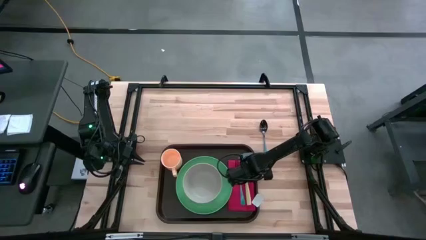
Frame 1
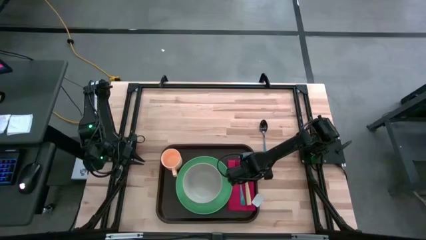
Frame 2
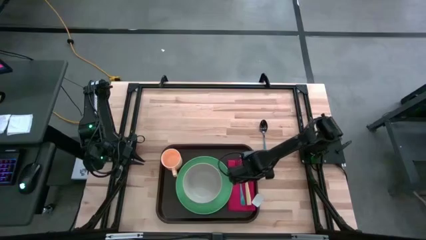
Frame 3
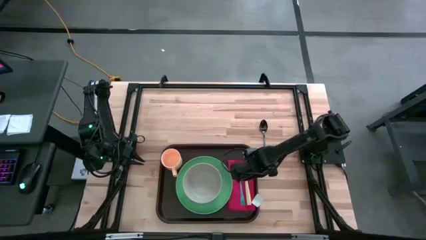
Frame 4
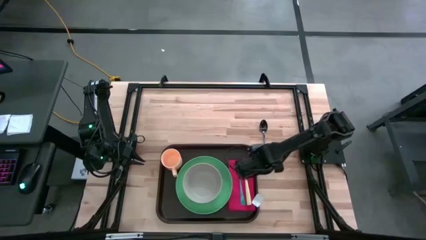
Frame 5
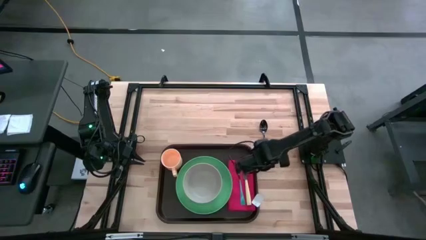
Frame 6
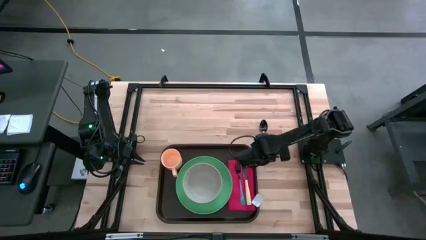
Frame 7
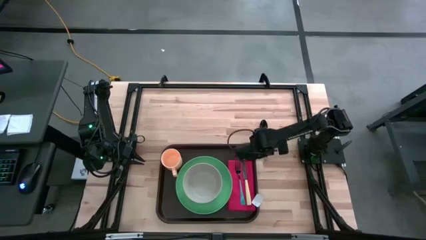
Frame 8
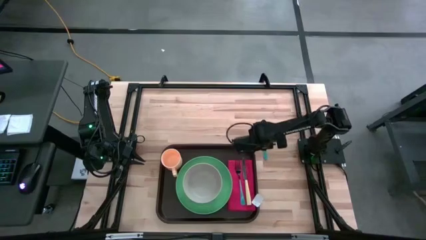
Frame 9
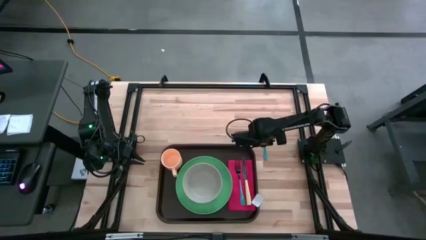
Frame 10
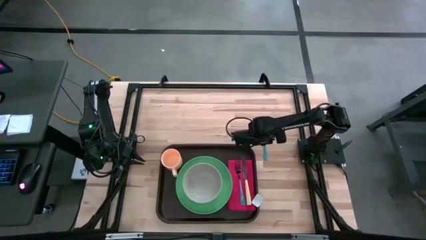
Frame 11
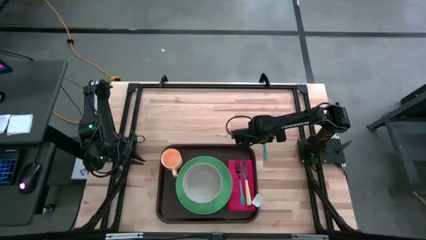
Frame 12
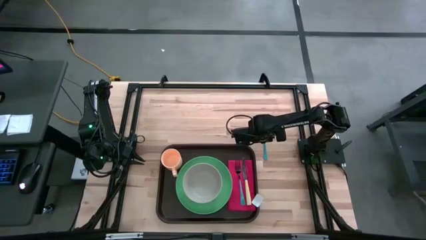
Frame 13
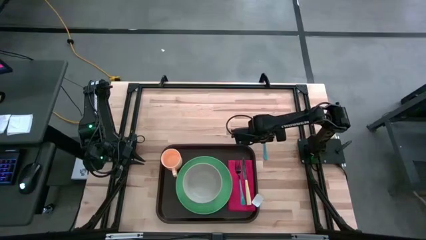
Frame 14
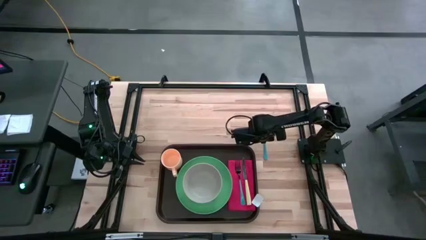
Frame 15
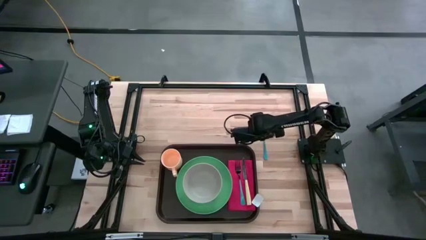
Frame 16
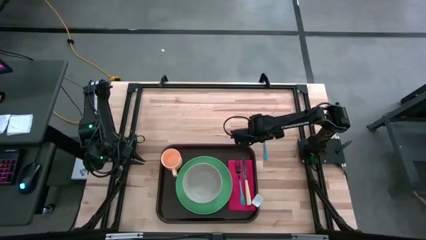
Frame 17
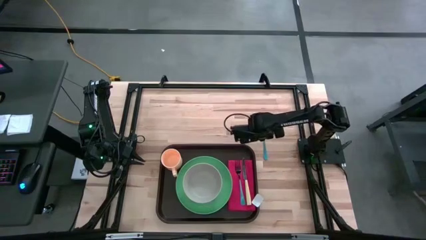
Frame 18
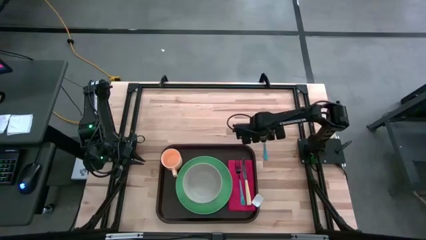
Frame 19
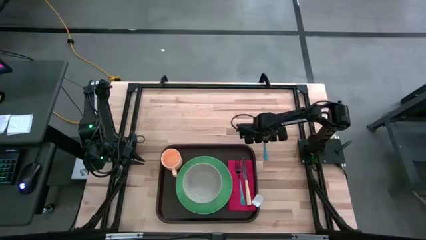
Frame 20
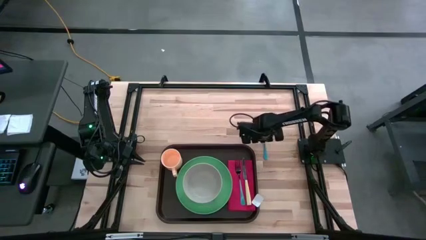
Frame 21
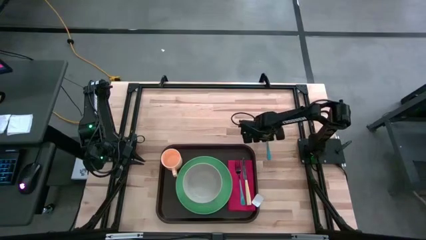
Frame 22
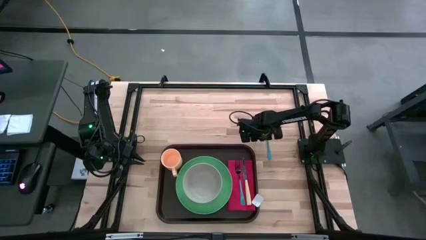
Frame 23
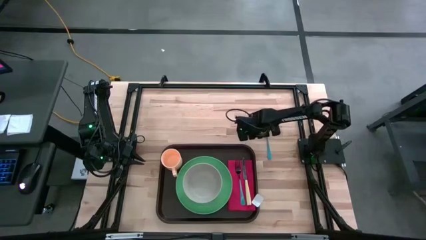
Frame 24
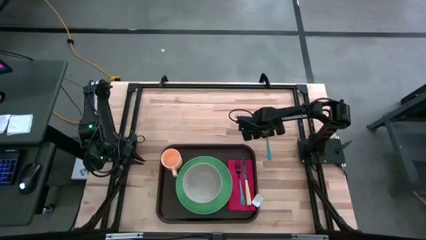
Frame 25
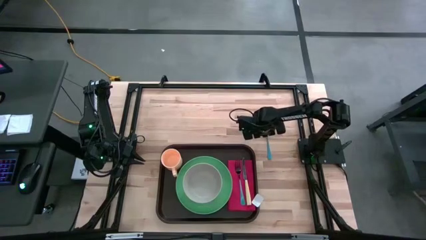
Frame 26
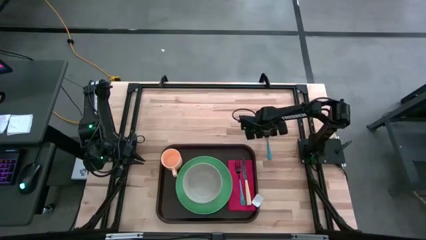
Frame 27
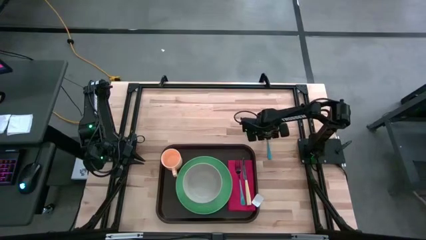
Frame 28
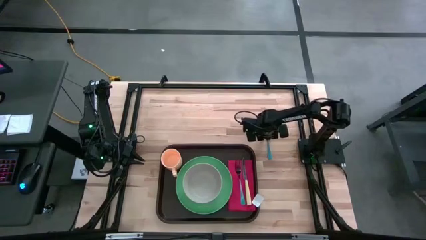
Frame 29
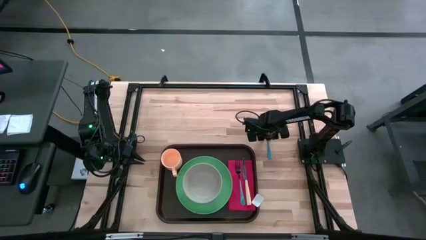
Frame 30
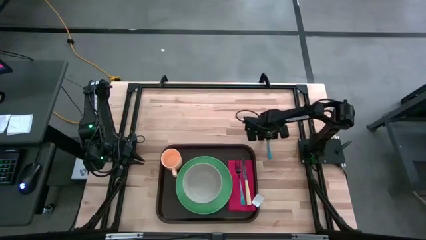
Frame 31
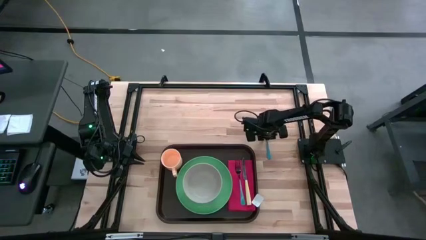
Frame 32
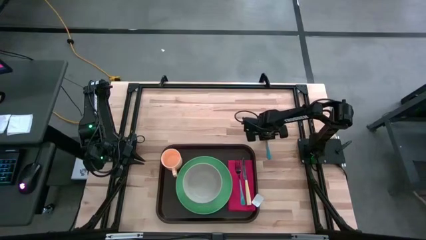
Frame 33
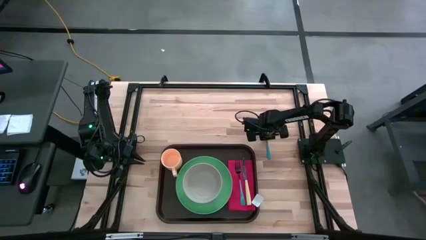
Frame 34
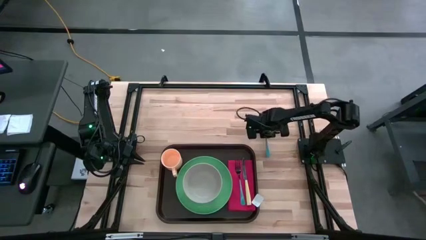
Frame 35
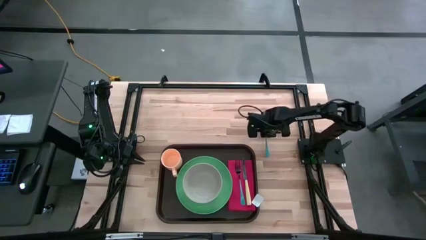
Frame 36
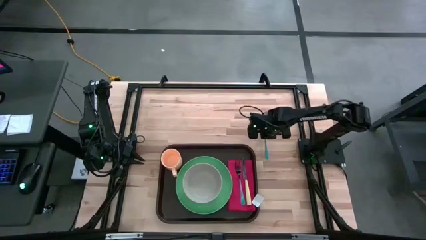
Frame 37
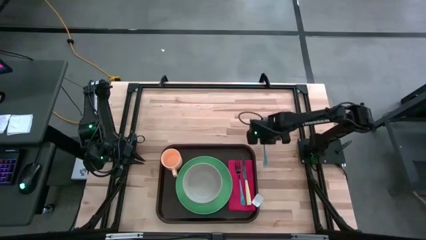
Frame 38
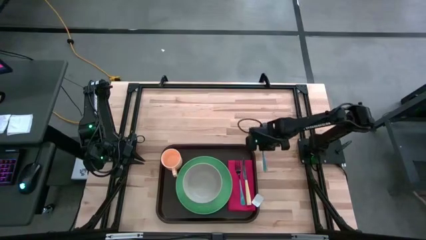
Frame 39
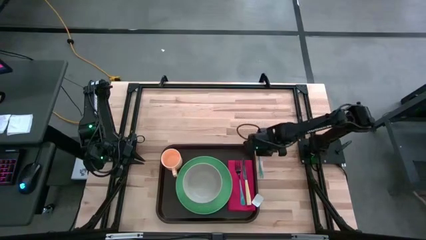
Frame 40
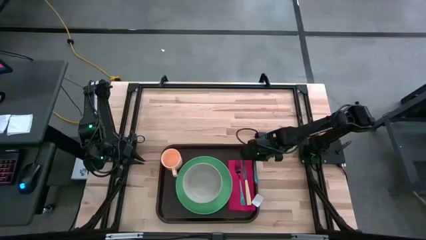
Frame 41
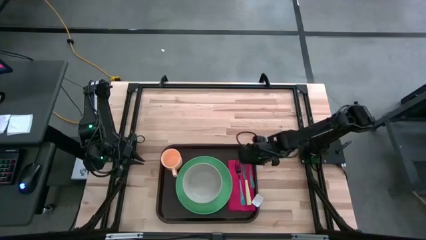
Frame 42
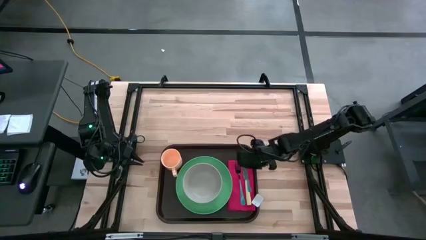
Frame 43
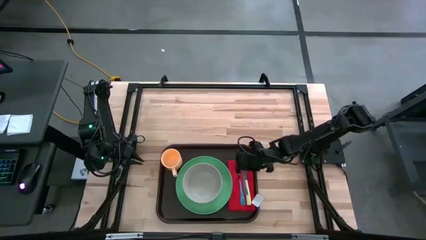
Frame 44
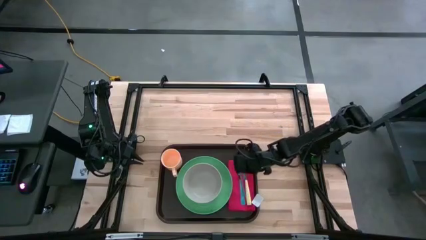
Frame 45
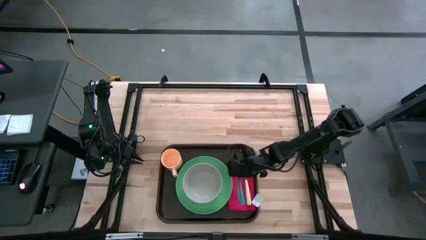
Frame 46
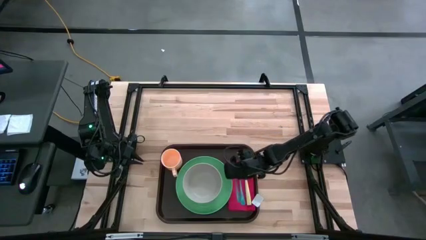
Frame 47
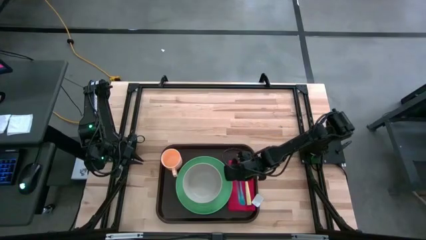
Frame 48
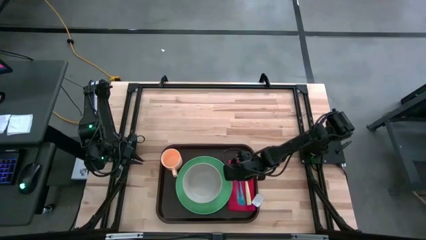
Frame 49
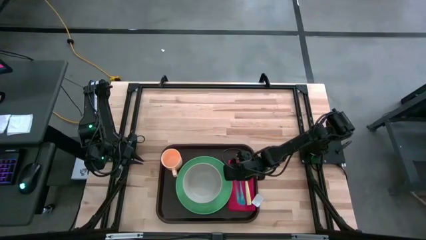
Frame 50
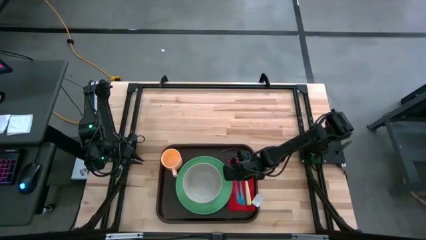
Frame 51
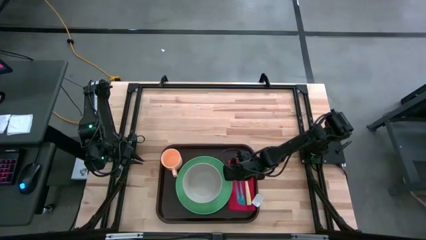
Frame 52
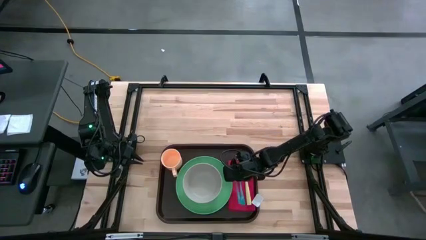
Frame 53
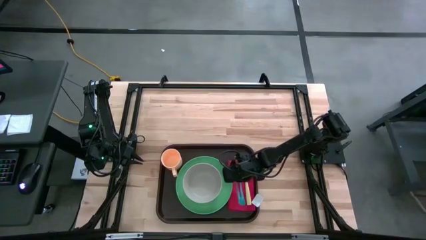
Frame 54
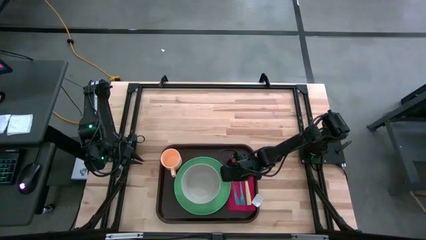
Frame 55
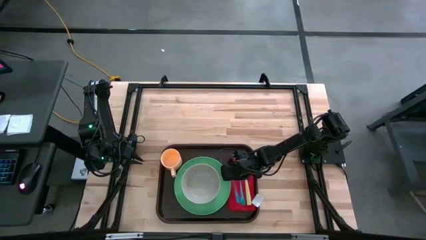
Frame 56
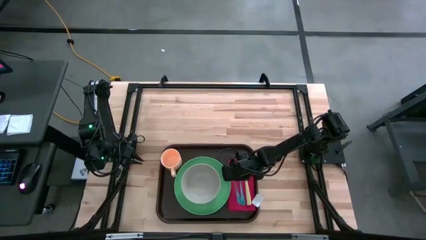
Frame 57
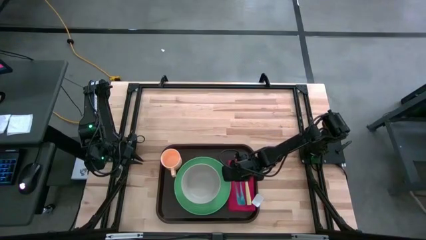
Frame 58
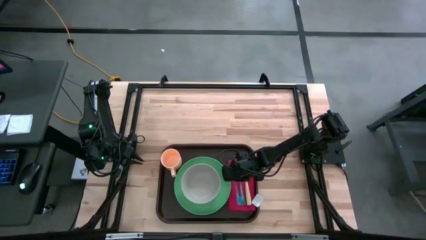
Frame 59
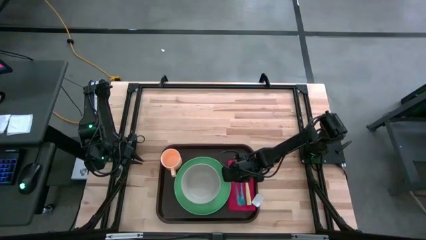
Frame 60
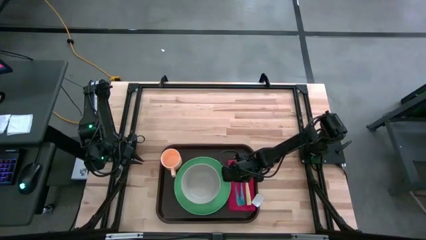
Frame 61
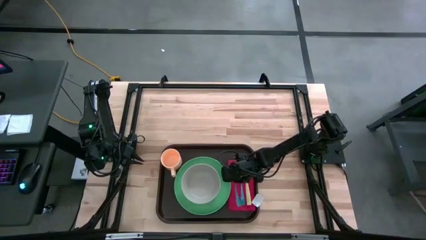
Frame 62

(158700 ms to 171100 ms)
Task: Set up tray
Put the blue spoon on the red napkin to the left side of the blue fork

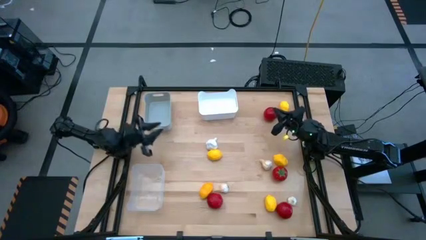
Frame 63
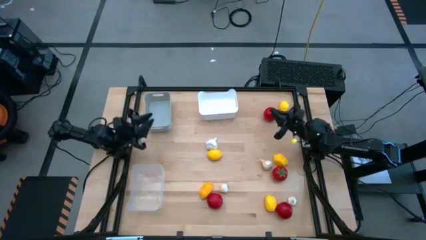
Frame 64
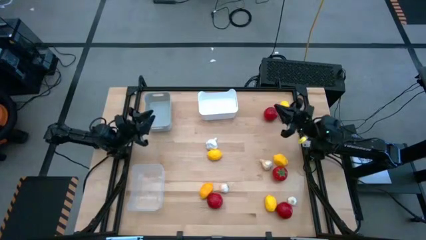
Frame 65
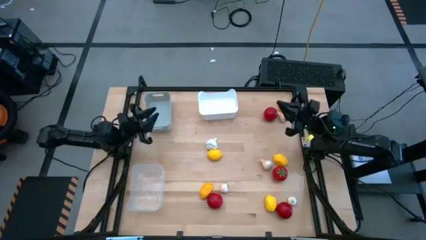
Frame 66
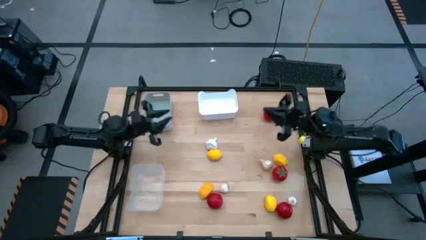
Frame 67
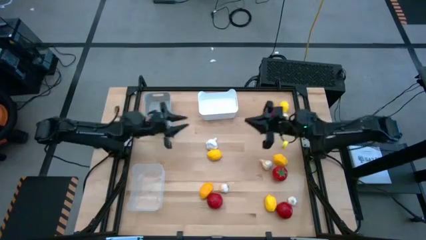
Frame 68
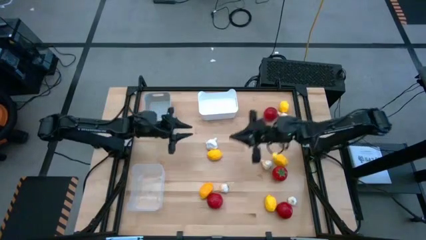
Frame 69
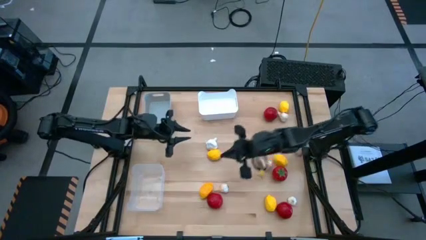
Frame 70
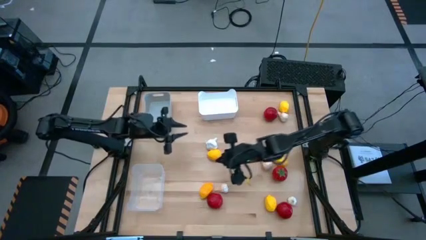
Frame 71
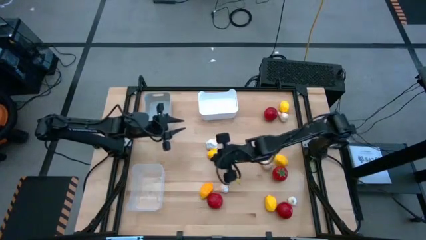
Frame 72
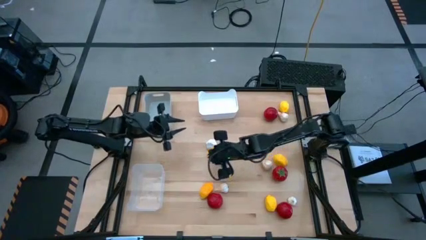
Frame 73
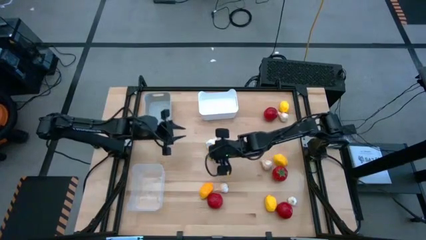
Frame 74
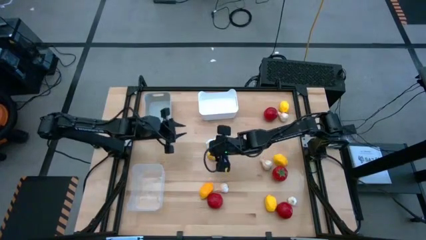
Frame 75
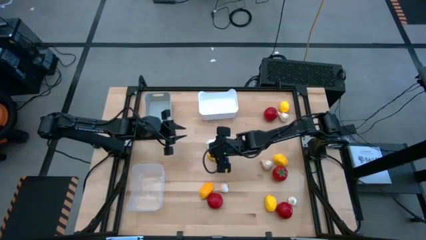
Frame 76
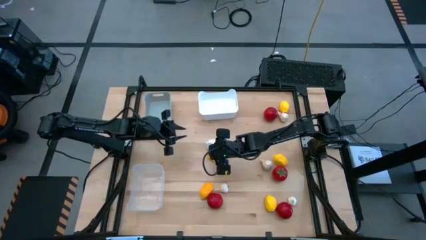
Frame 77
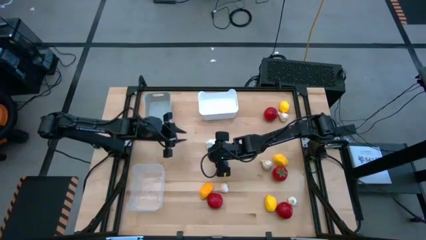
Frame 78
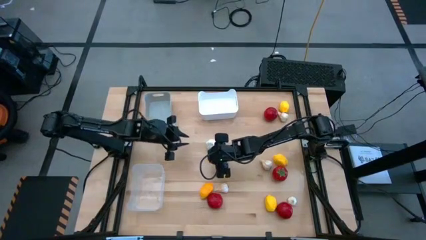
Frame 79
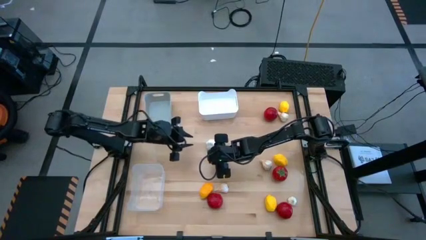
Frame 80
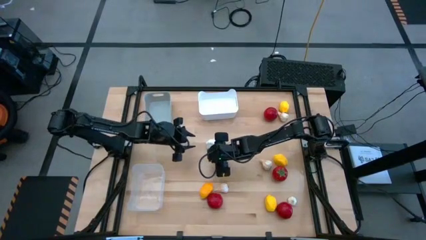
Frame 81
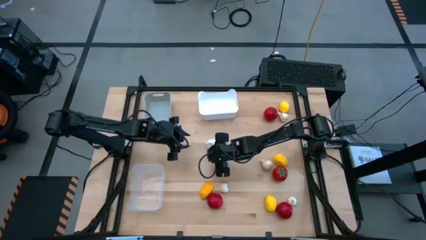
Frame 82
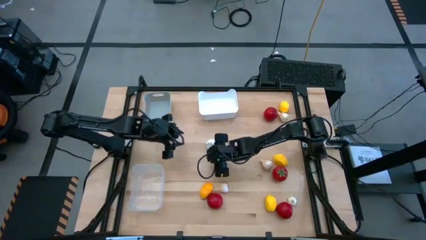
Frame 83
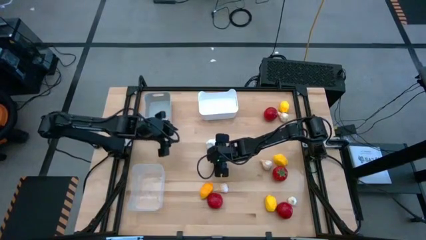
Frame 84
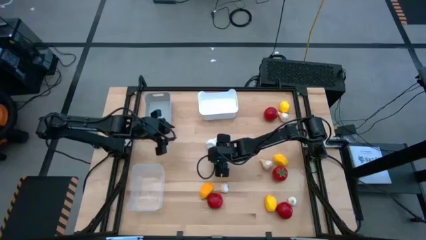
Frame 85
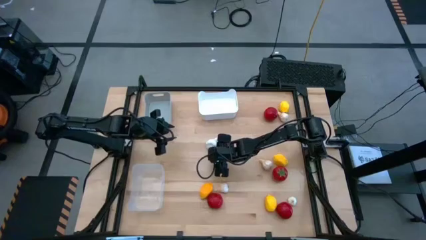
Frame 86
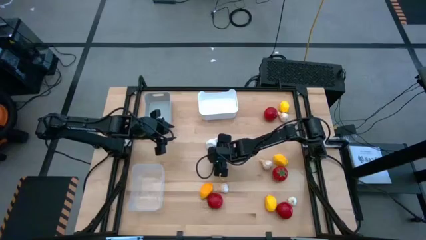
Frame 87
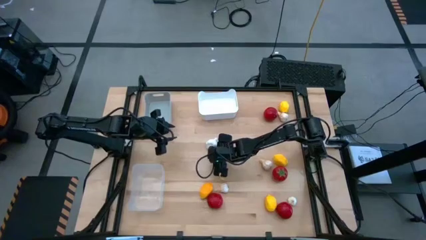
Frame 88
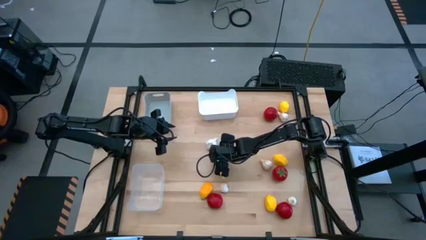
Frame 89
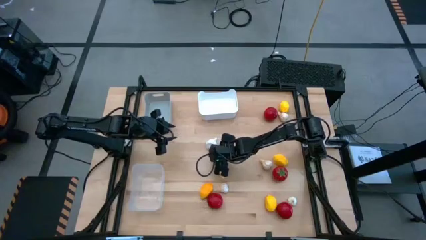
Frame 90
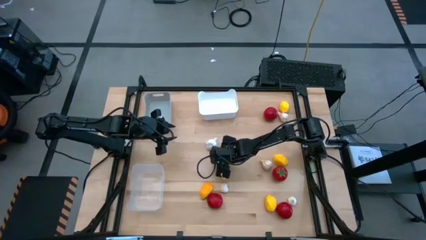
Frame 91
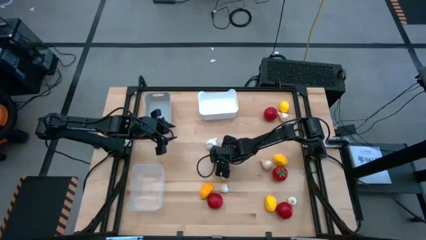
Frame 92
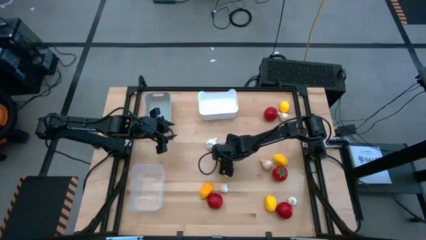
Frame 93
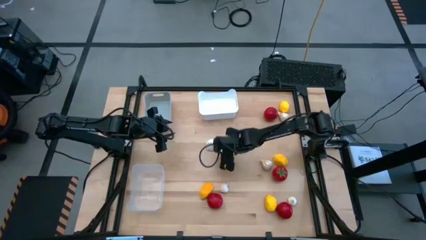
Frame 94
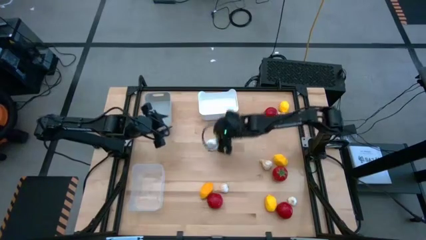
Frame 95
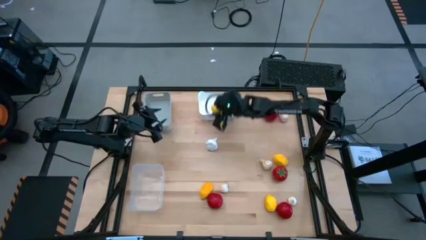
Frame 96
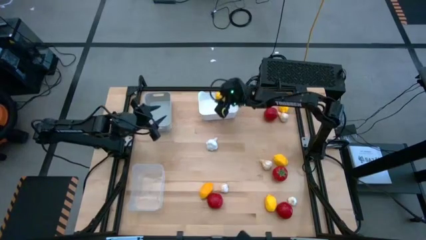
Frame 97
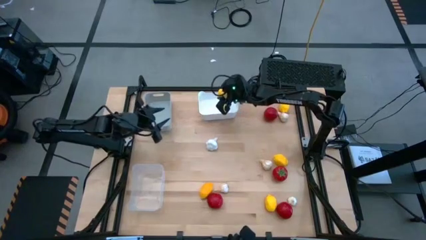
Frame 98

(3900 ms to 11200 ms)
Task: Sort produce into baskets
Put the lemon into the white bin
